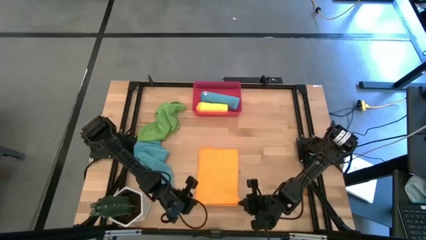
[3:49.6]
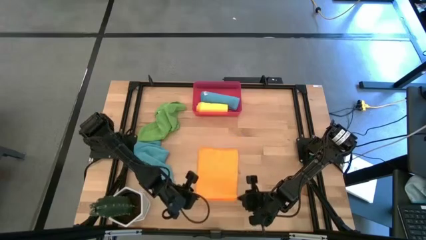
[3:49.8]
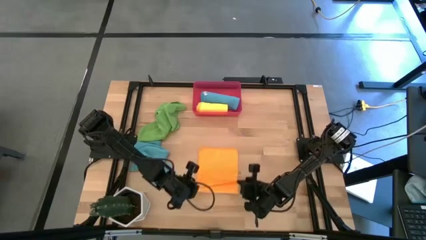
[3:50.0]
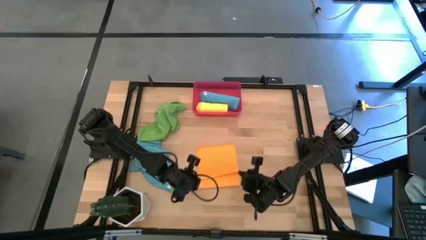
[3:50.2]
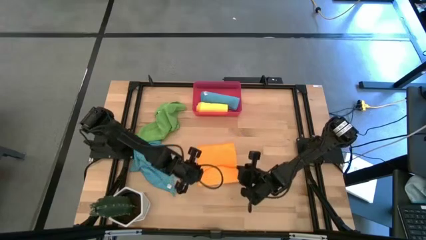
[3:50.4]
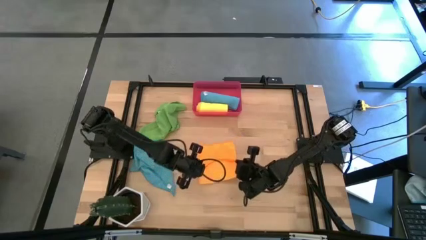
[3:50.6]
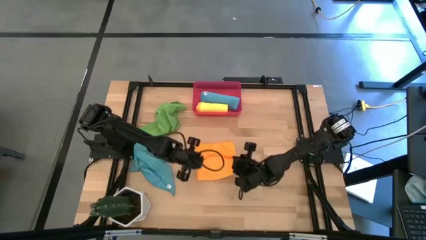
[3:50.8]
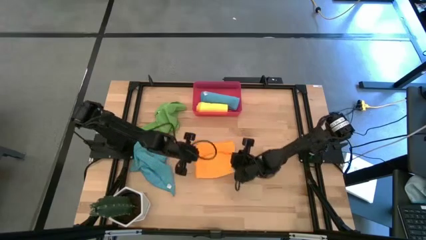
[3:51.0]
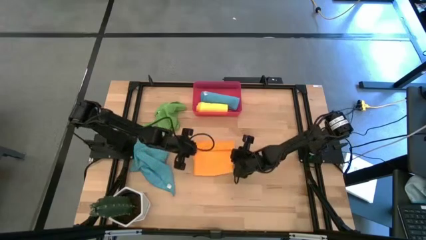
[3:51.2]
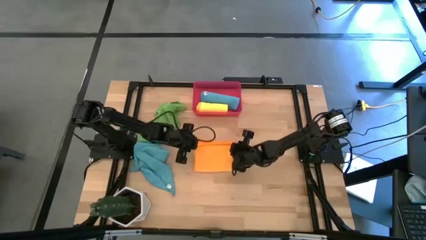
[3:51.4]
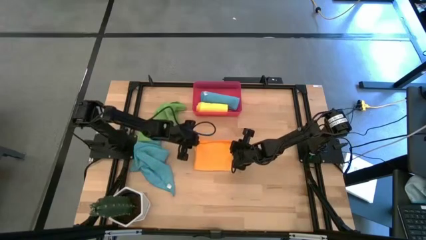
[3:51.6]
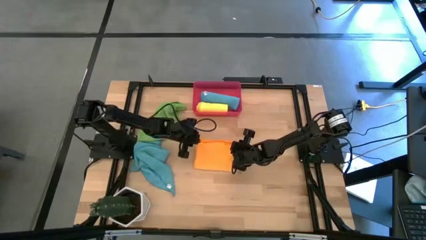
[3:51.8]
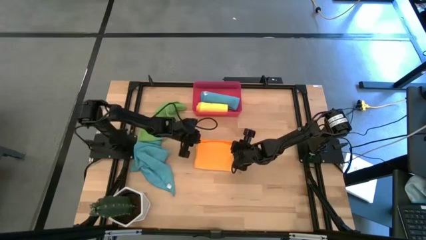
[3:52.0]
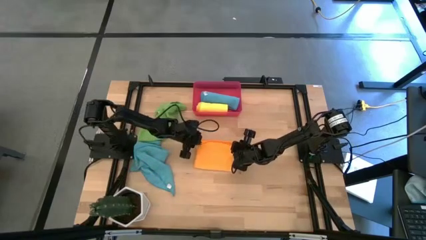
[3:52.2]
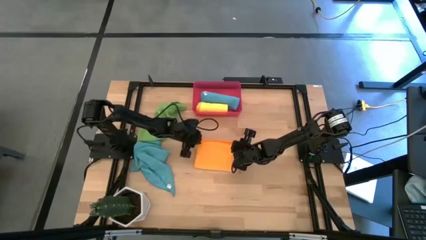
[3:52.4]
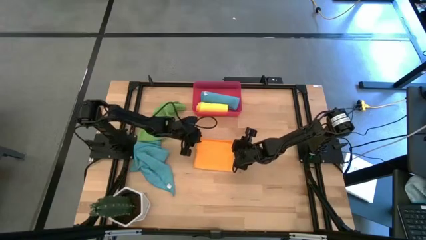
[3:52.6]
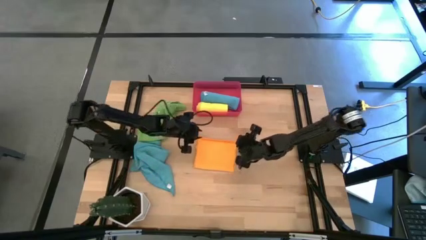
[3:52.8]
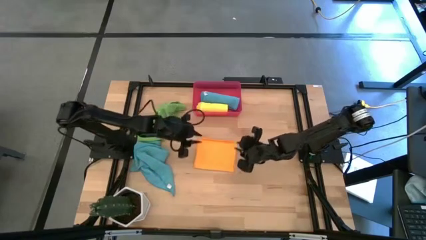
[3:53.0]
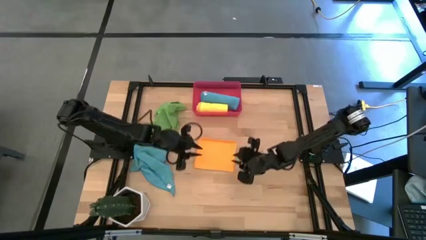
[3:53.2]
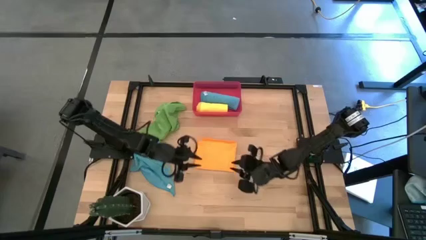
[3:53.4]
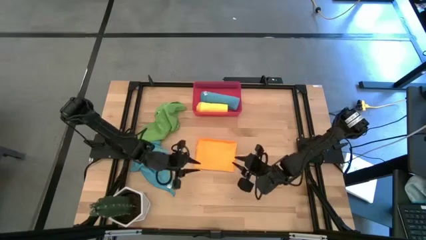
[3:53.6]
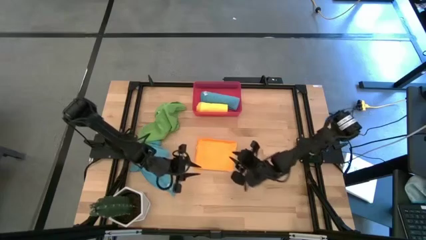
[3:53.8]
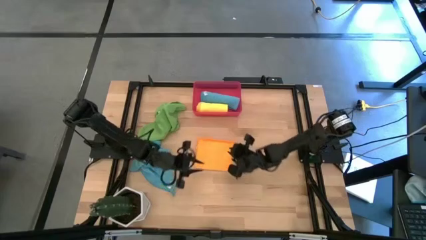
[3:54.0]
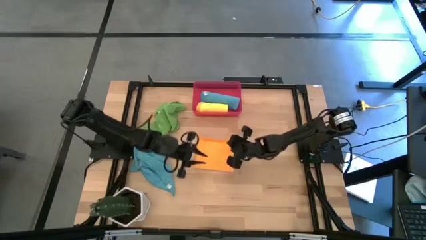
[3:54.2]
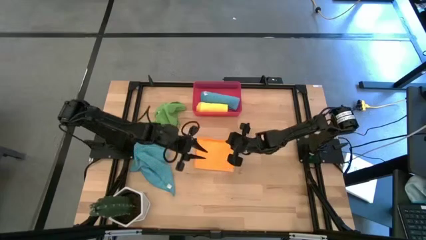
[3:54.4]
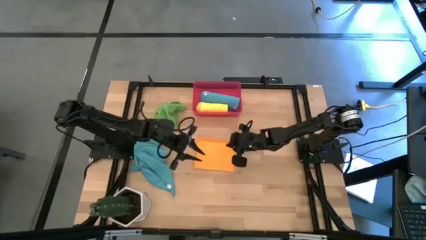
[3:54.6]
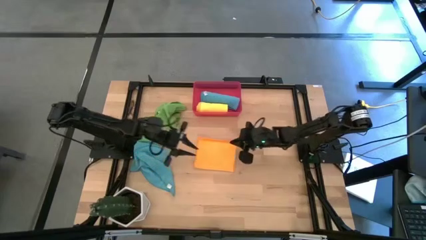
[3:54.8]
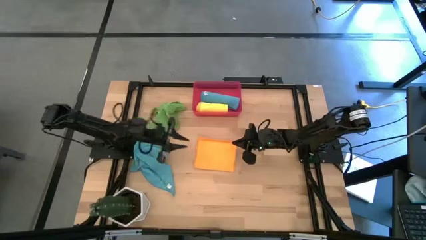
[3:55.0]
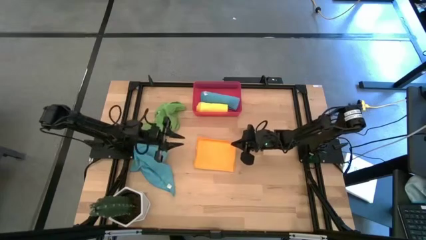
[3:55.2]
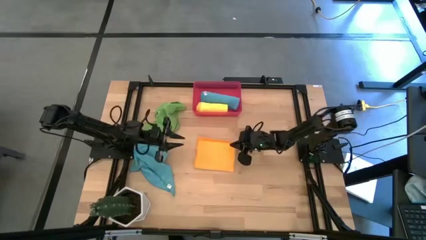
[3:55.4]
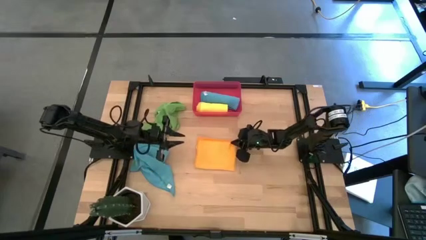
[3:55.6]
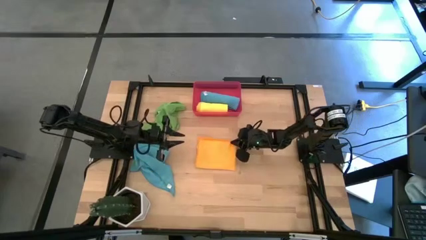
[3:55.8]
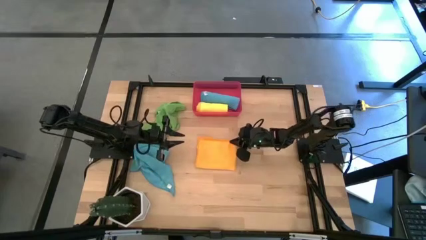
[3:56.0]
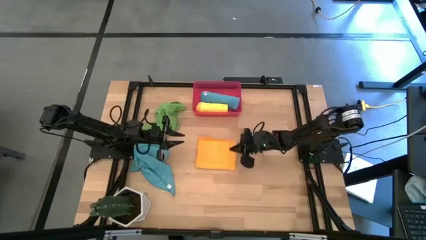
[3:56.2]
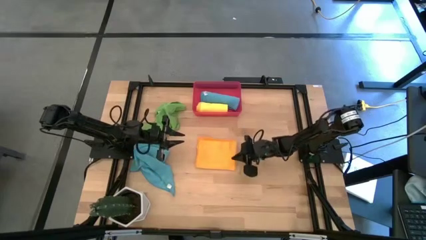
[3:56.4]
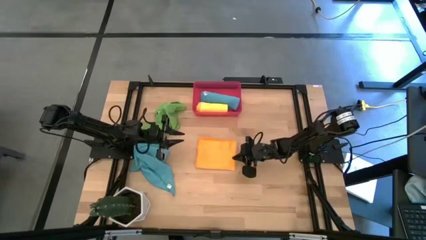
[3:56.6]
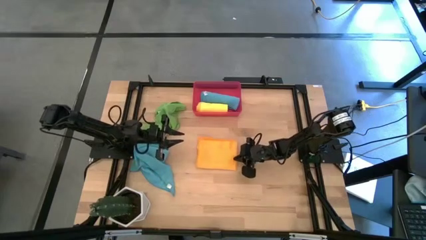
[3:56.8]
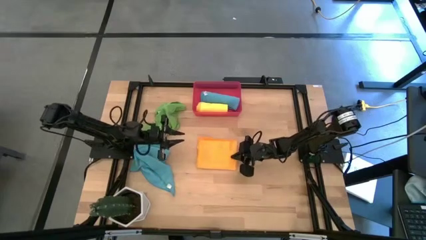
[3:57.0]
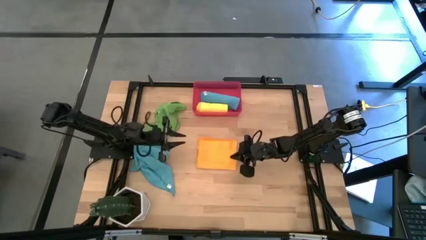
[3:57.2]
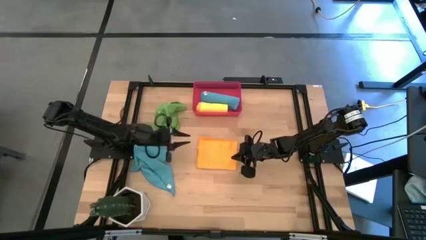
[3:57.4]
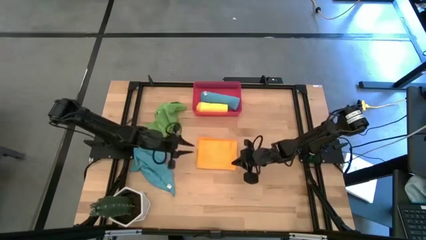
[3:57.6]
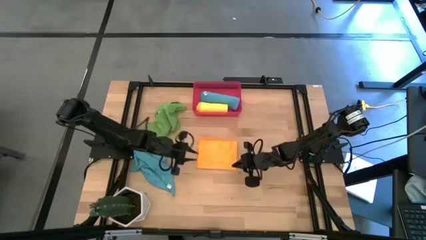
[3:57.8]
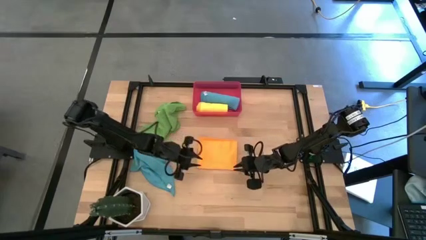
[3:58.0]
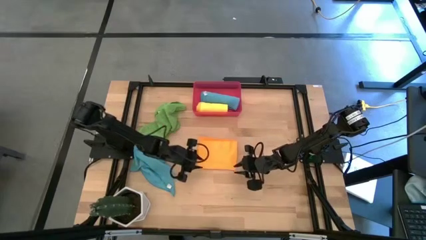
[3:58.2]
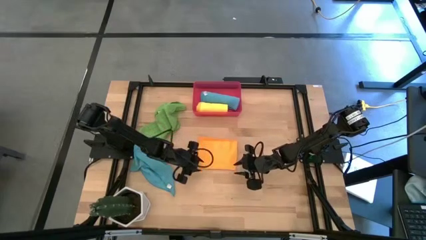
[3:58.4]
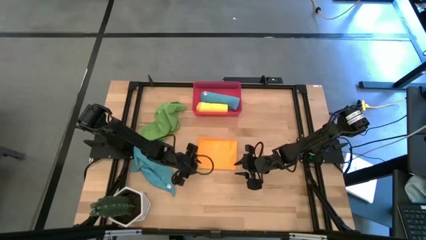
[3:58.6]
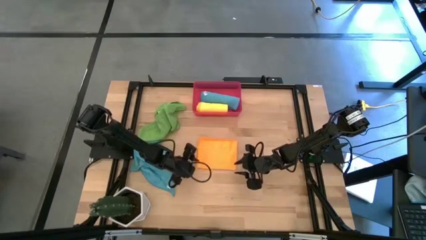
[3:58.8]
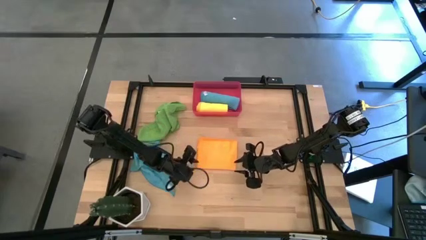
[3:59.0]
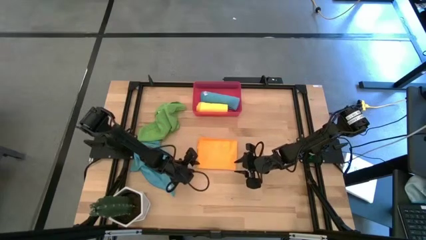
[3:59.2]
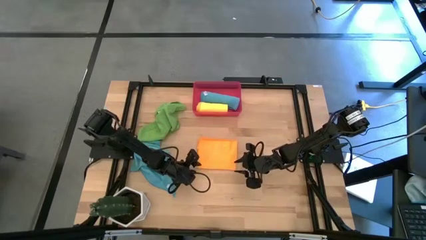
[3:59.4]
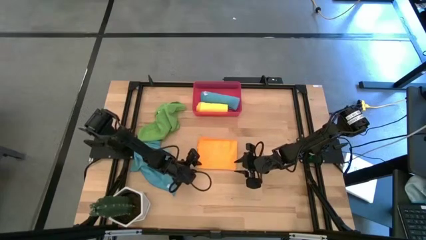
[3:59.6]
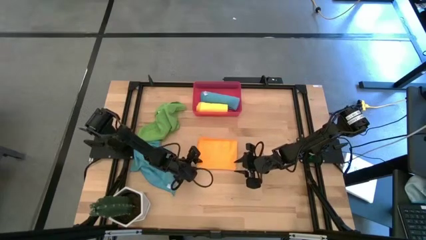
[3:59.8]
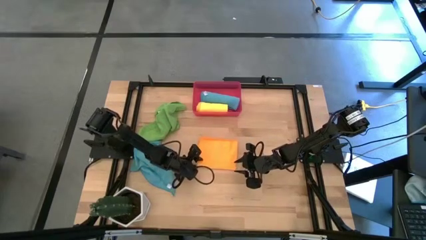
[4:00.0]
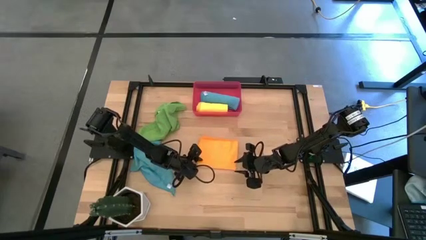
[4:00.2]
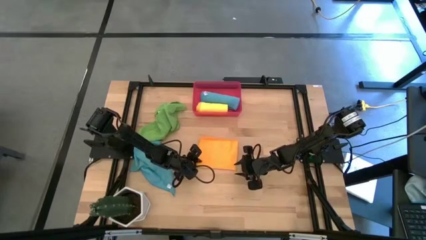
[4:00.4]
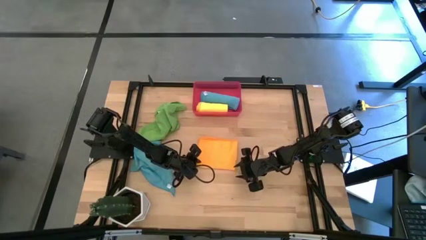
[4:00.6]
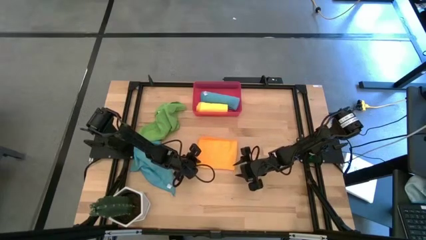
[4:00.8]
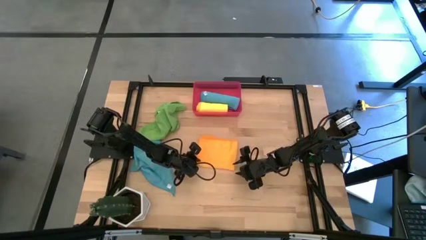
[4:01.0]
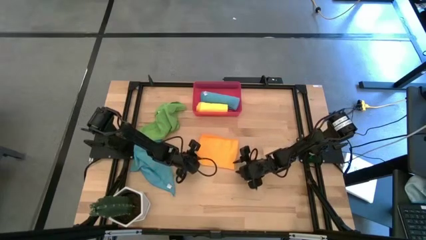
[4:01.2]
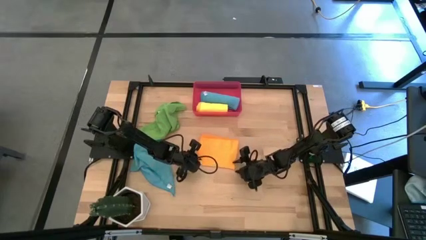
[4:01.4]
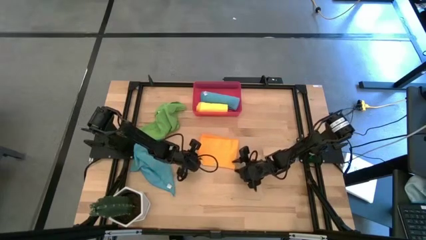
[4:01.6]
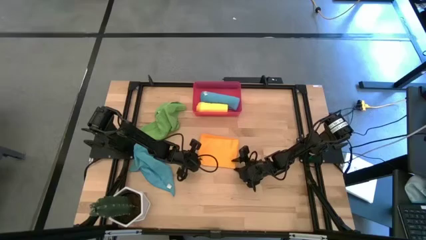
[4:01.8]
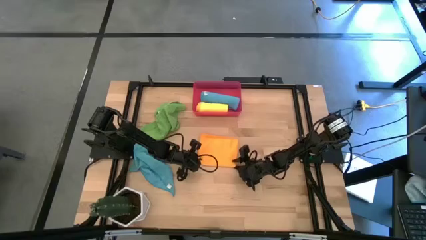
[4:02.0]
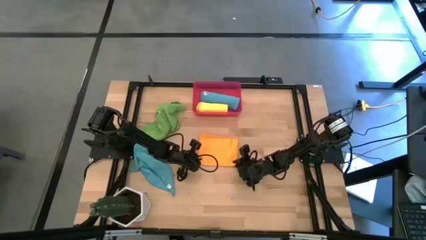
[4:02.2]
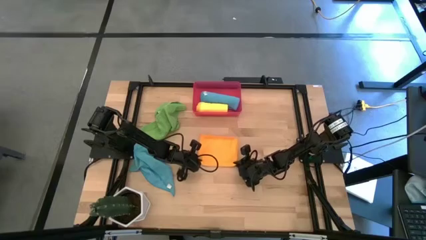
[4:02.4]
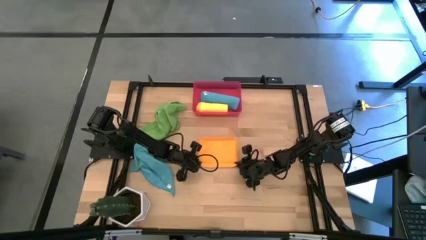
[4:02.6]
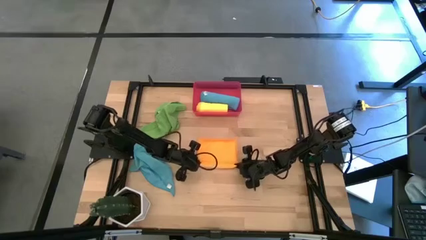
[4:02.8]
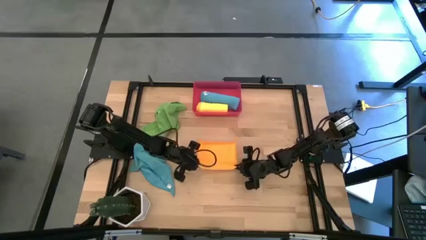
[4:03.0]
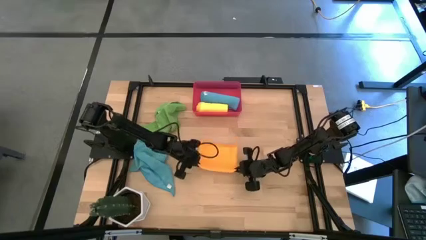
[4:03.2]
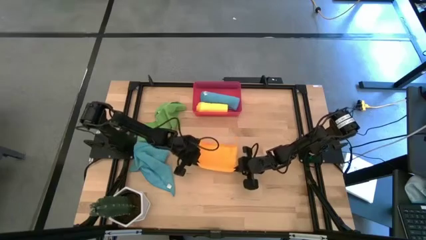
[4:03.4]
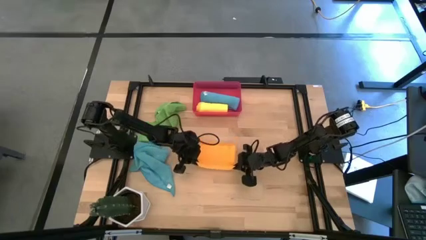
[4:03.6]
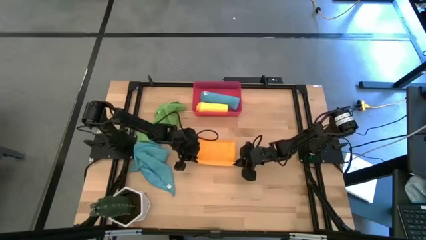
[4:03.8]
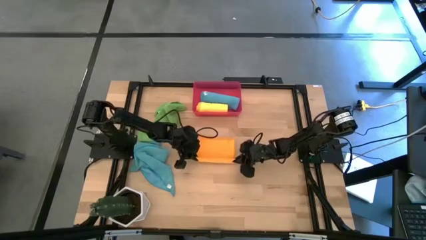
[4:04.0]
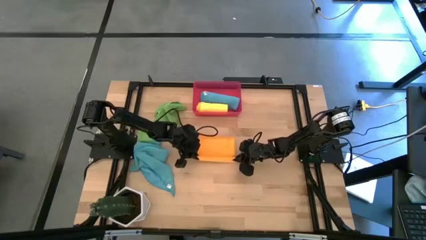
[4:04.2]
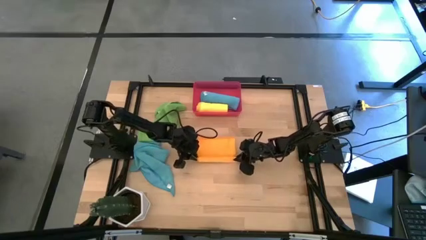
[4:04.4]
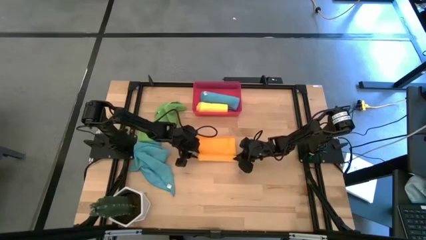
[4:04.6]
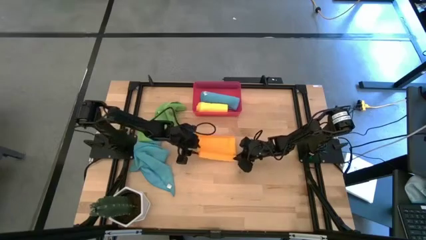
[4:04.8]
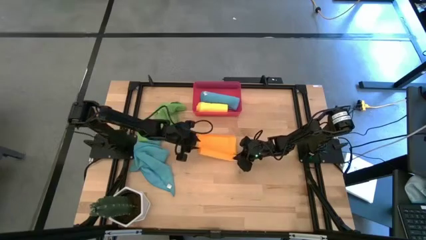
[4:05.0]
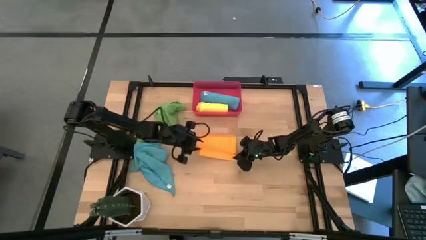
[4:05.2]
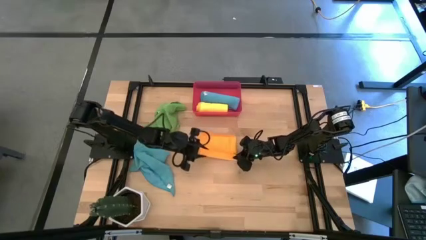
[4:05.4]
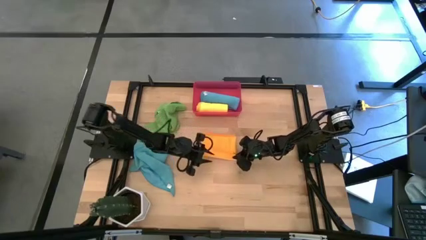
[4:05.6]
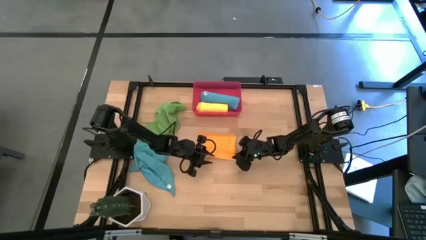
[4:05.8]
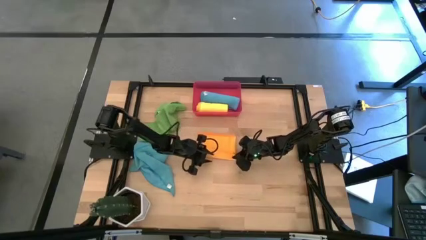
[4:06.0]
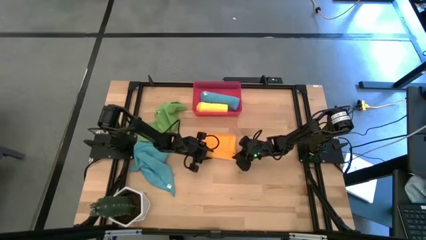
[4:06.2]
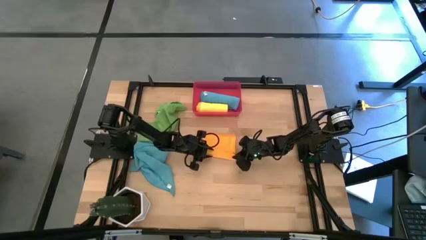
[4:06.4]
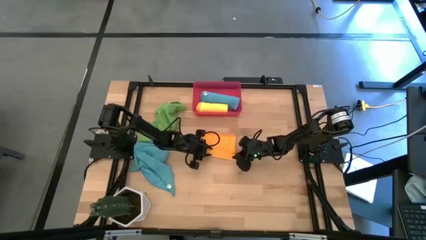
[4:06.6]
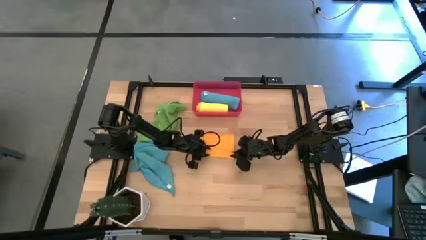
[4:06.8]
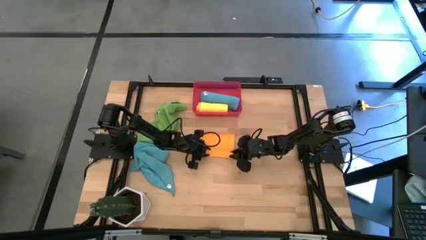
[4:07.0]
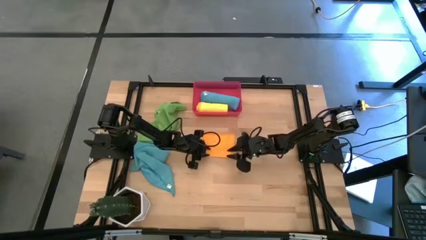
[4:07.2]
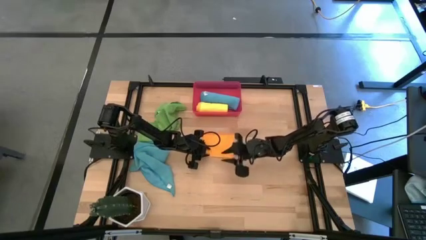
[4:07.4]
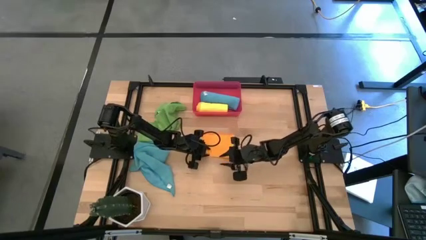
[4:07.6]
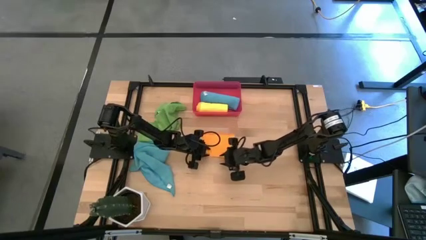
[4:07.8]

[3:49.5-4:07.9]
Task: Roll microfiber towels into tight, uniform cylinder then place into a basket
Roll the orange microfiber cloth
